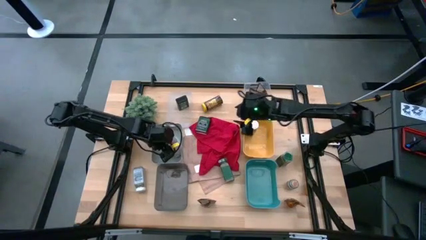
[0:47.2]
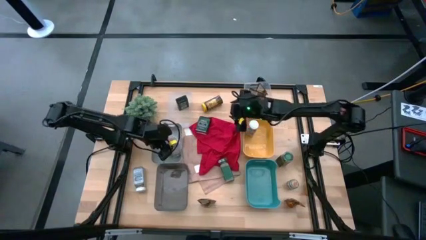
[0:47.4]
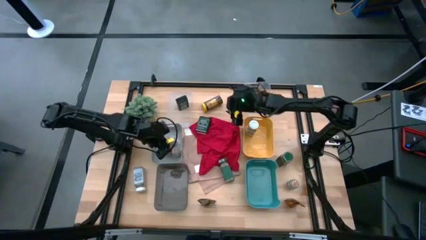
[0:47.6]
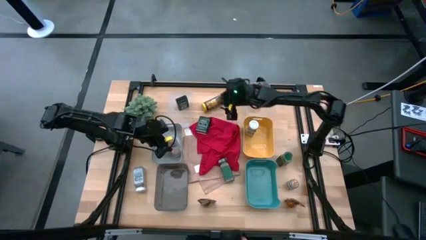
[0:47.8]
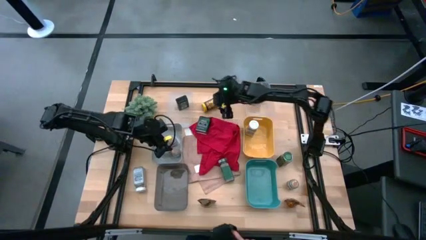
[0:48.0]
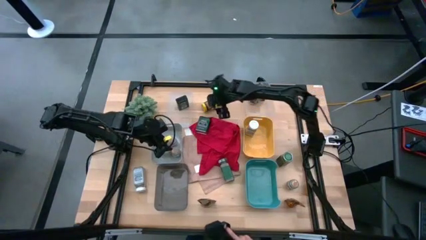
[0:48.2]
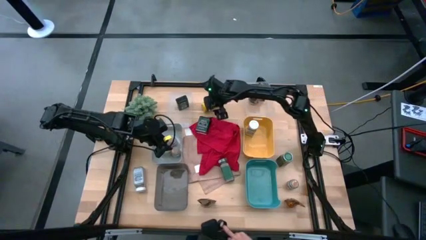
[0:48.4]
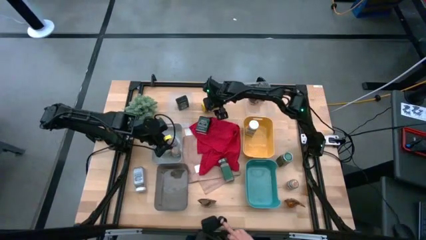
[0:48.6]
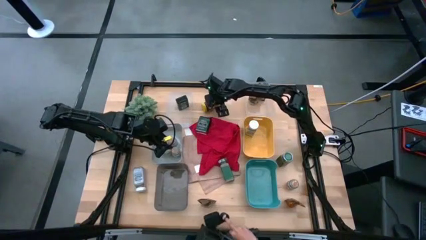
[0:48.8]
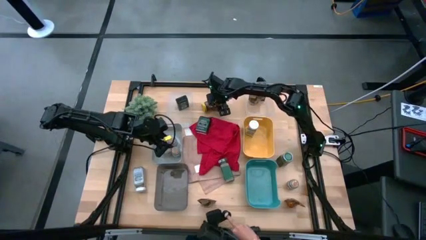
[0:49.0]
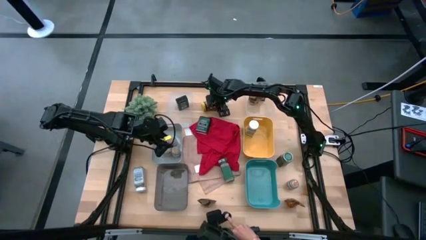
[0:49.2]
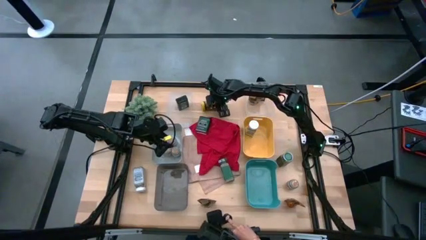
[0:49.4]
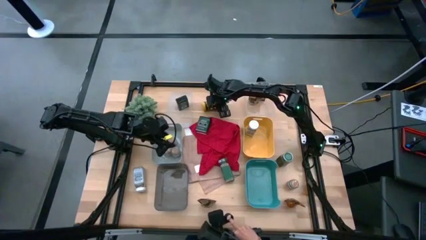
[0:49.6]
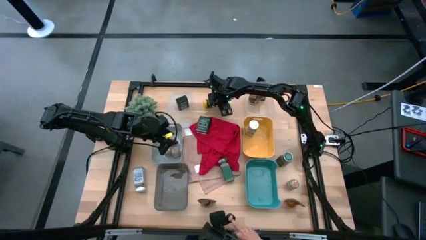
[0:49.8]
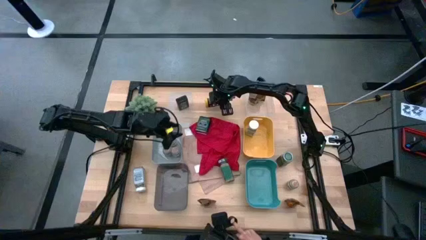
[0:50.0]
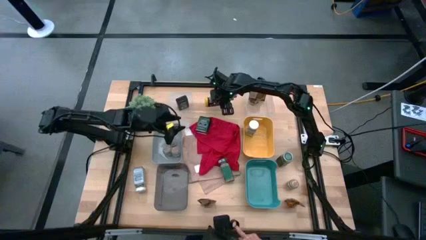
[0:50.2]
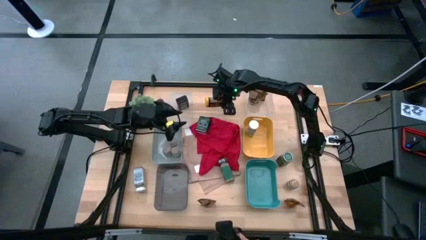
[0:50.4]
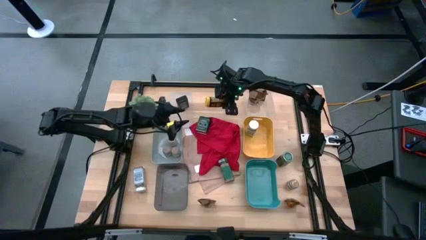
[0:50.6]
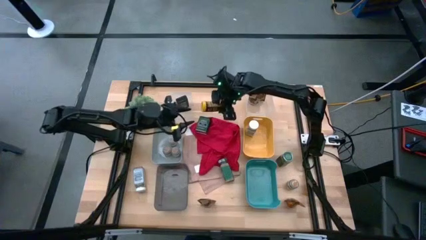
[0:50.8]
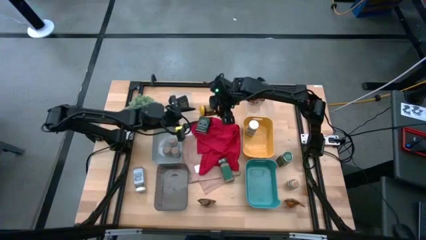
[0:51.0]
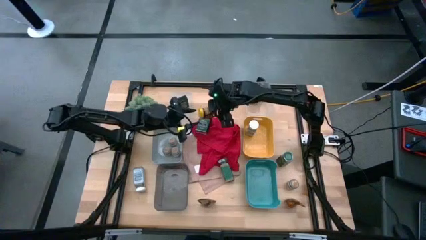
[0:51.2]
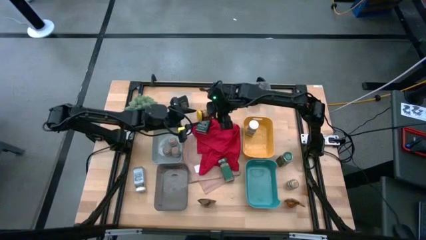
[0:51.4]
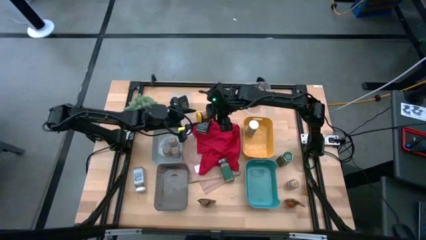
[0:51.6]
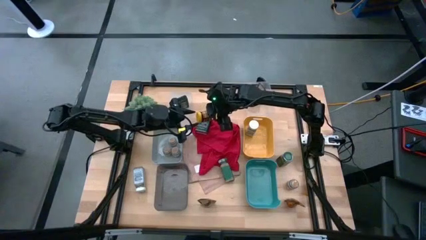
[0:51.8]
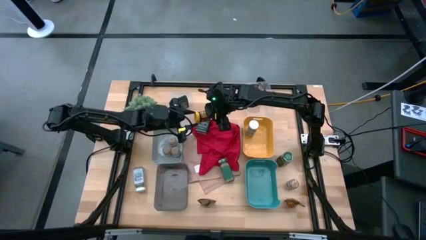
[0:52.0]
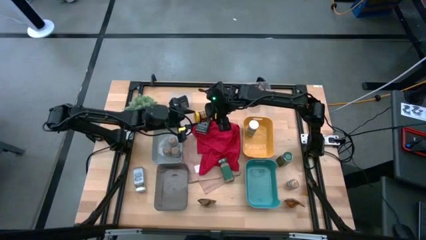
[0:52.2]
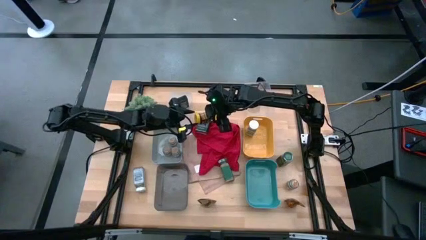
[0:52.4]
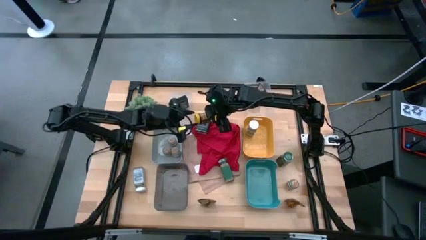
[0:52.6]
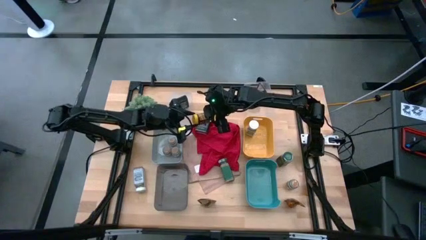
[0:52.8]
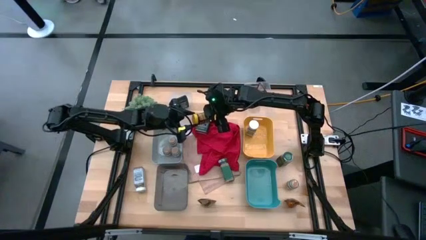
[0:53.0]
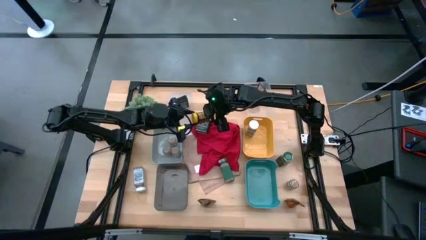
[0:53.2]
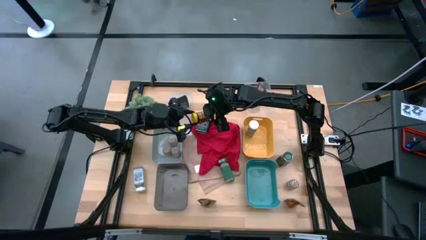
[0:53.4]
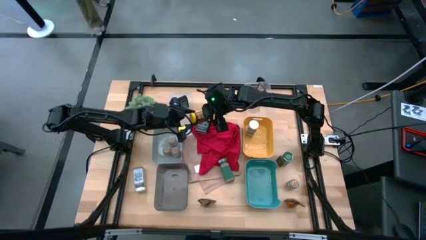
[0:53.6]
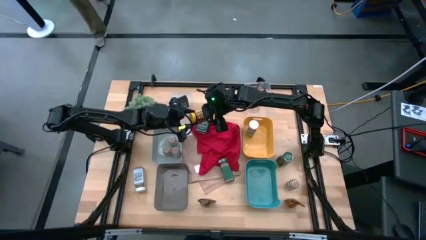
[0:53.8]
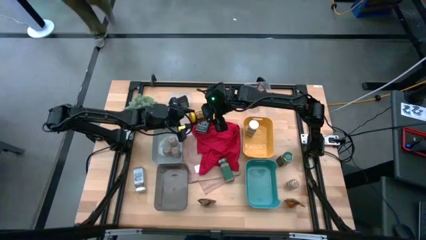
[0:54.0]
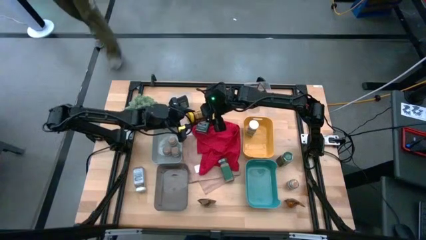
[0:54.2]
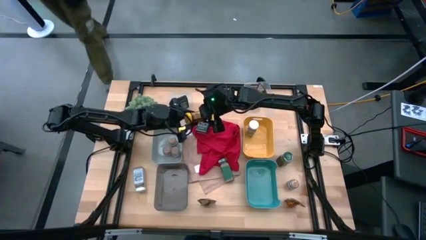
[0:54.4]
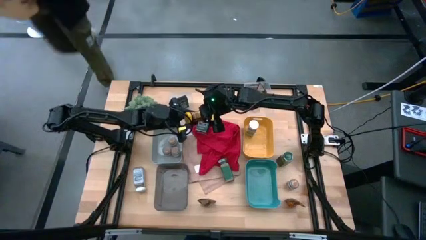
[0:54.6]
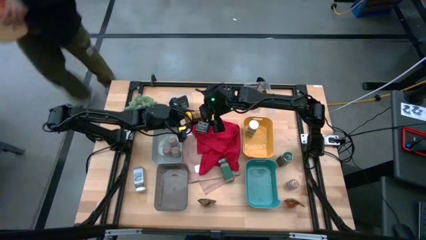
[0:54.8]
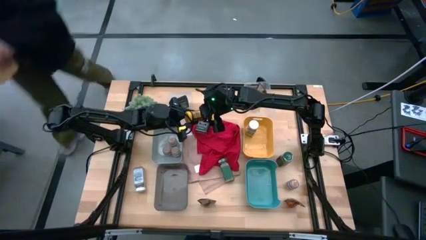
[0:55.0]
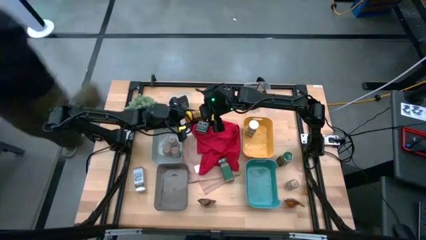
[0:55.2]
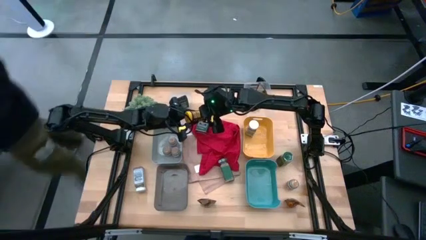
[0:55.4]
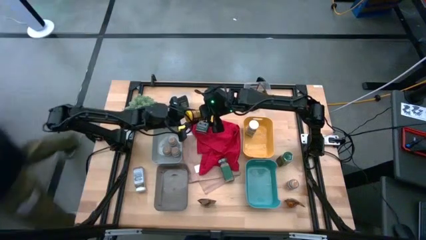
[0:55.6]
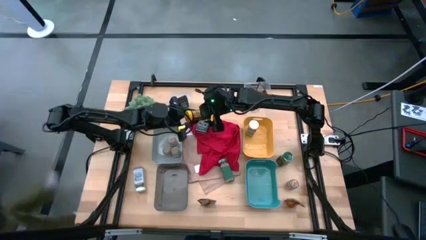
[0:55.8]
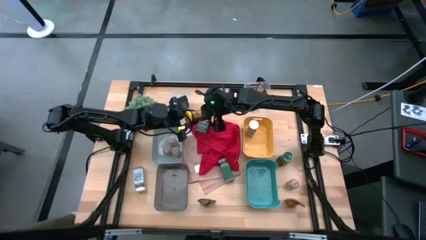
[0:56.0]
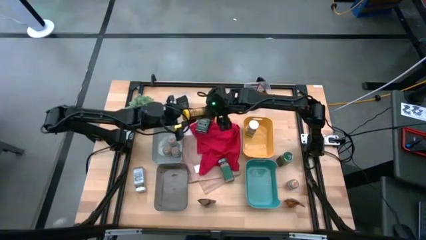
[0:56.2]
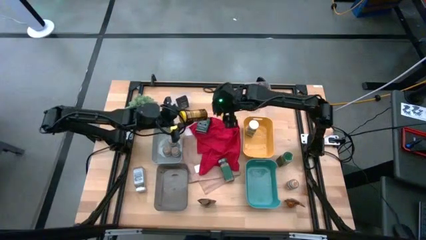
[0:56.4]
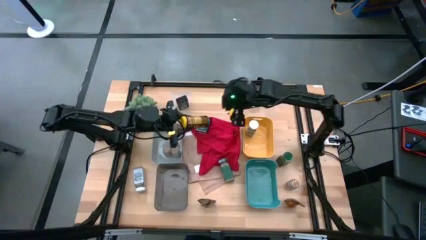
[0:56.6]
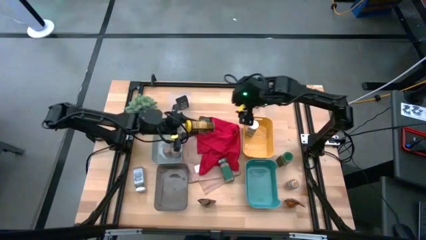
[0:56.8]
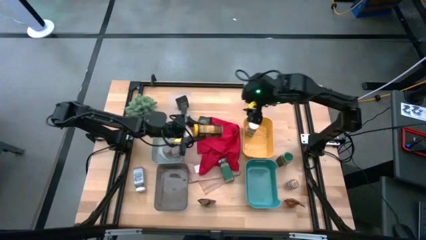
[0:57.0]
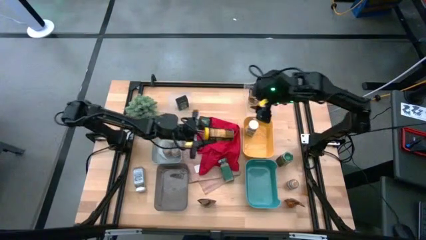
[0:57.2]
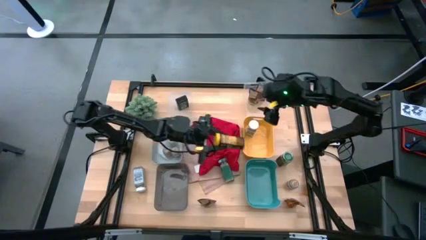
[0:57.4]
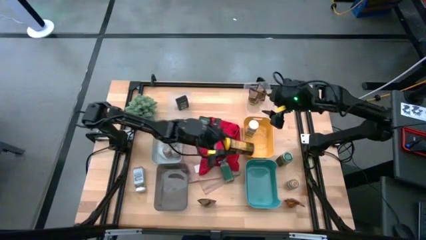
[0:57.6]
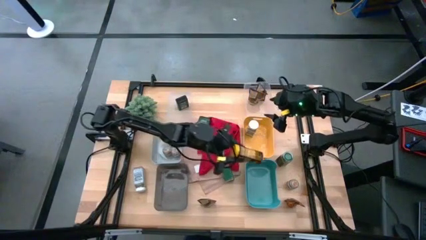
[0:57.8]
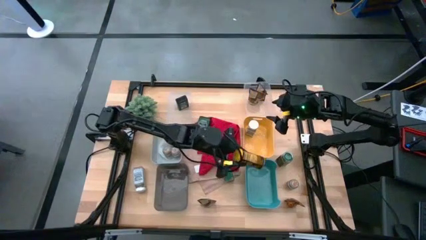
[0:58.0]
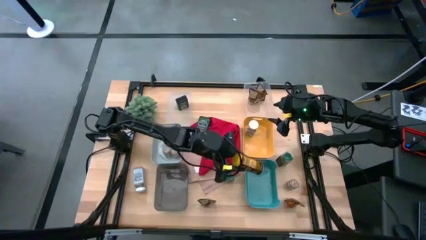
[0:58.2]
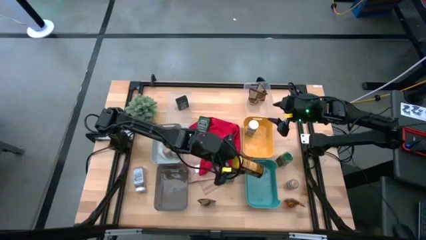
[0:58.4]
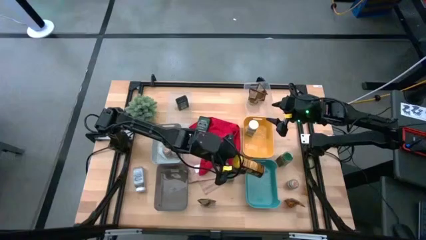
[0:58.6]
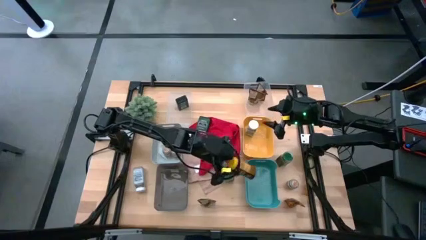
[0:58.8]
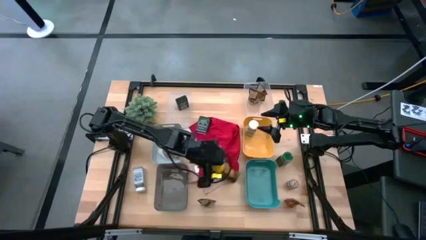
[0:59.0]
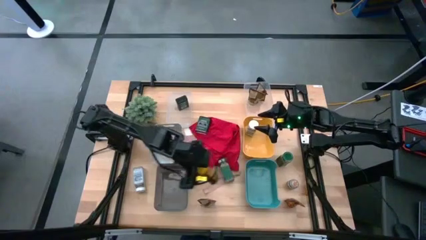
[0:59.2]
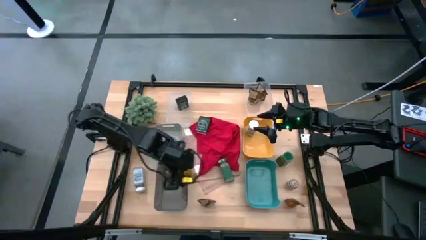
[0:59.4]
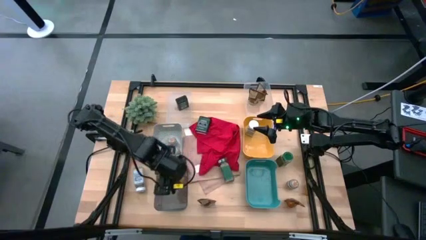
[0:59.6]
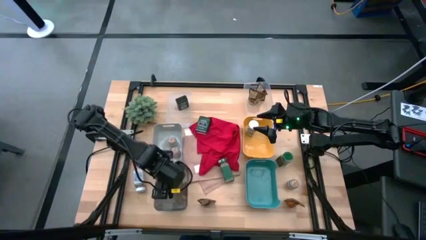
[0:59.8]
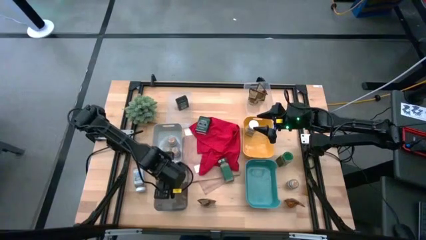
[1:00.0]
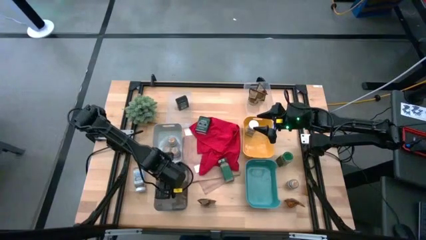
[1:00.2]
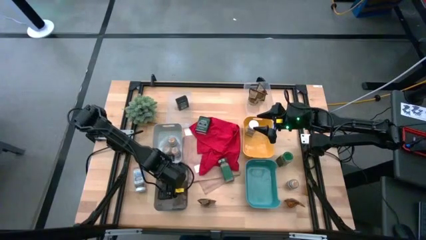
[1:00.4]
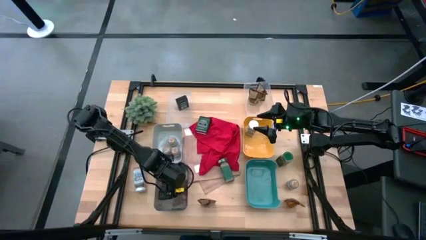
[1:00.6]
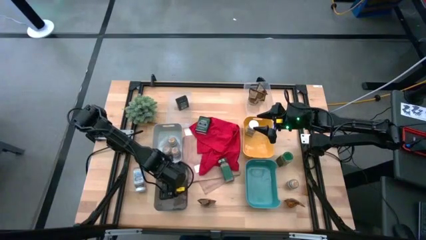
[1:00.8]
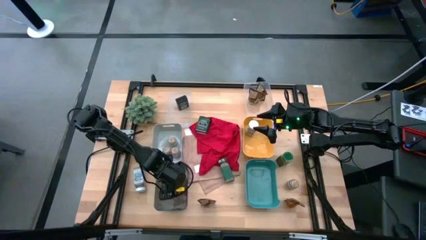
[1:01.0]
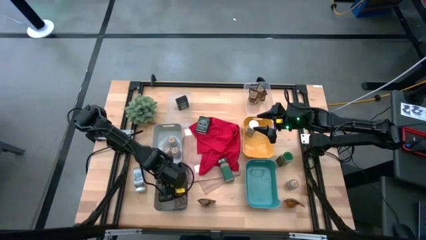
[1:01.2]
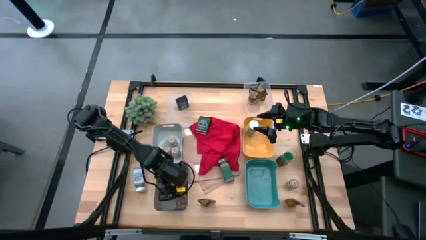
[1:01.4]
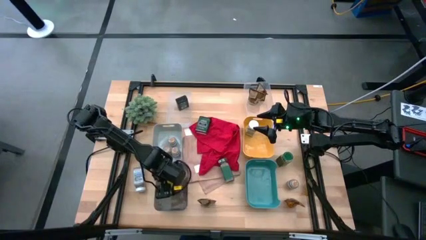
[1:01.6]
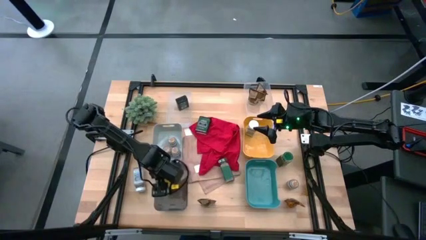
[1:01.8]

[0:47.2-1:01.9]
Task: Sort spices by type
Put the yellow seasoning bottle into the black bin

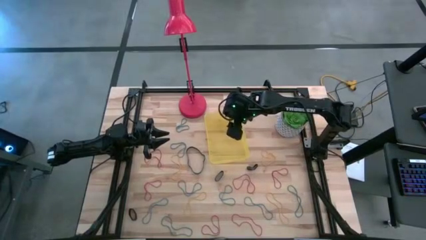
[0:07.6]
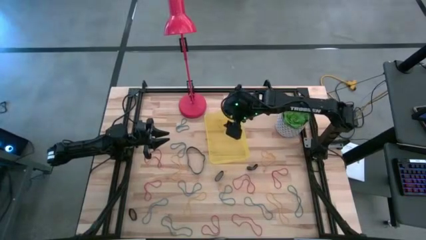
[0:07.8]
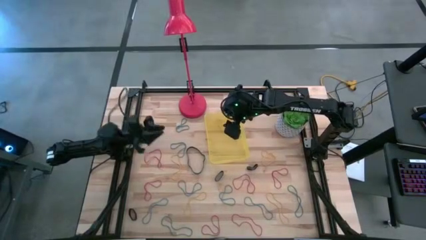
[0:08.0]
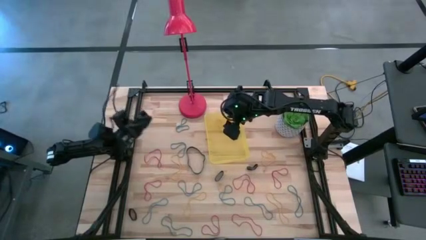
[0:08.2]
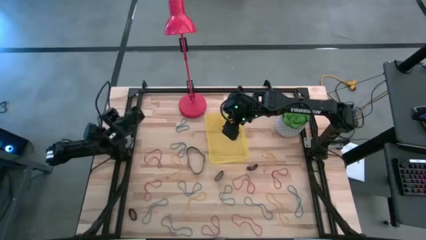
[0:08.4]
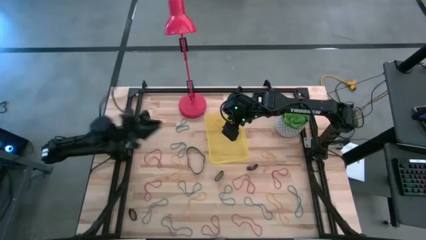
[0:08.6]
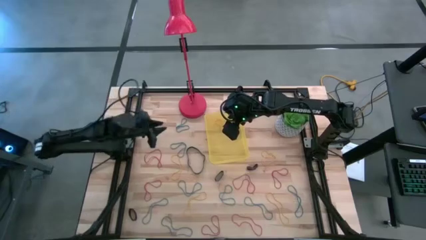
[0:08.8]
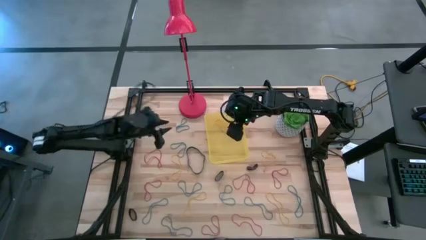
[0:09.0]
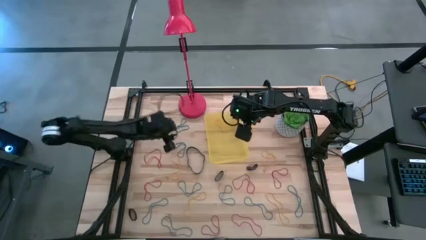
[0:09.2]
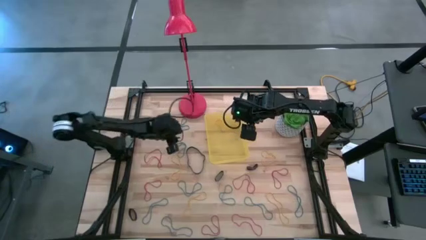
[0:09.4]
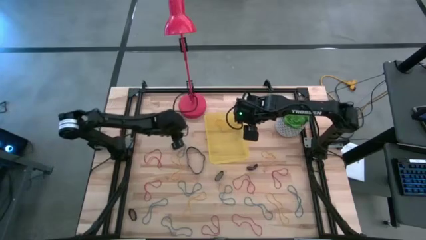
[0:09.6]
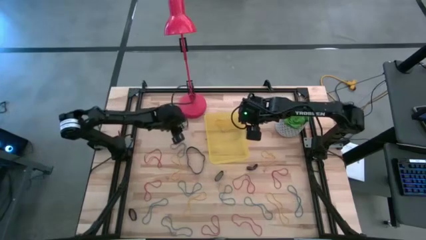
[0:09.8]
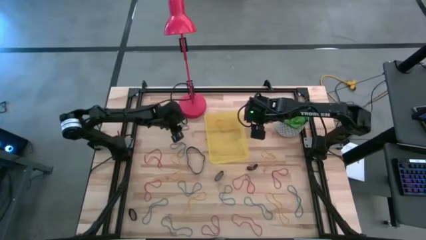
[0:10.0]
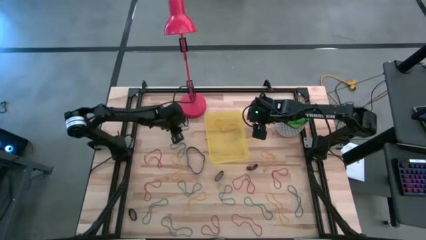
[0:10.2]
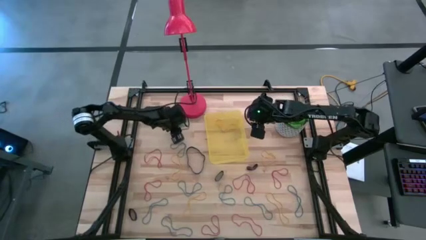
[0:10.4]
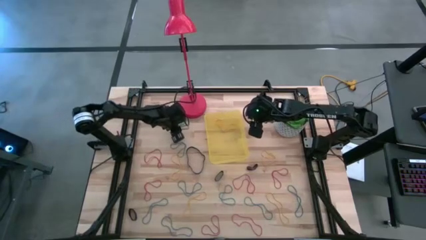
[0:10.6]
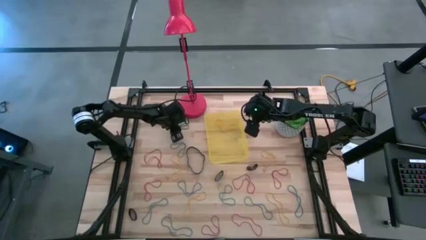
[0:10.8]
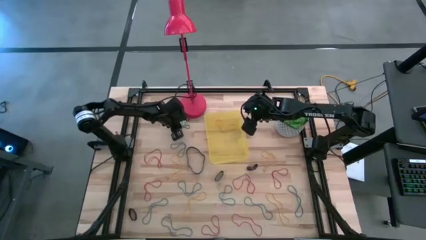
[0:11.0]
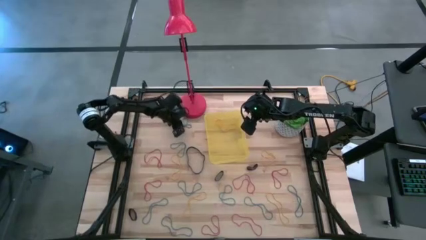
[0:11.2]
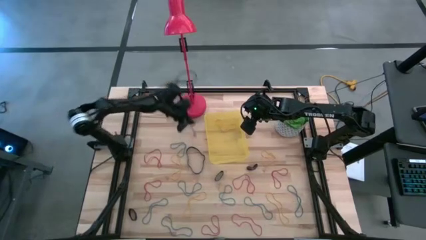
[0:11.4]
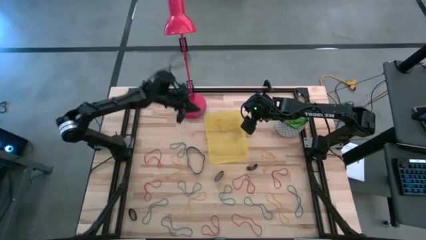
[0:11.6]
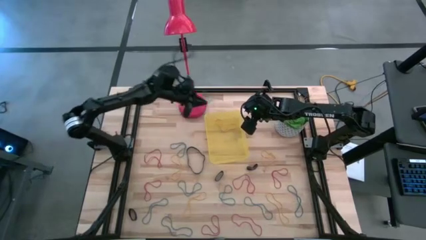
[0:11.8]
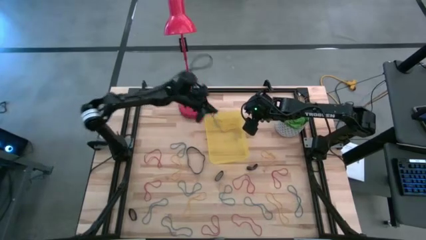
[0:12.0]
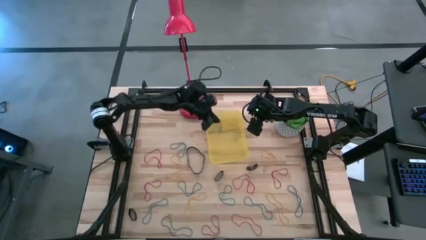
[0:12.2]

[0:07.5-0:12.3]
Task: Pick and place rubber bands into bin
Put the blue rubber band into the yellow bin
